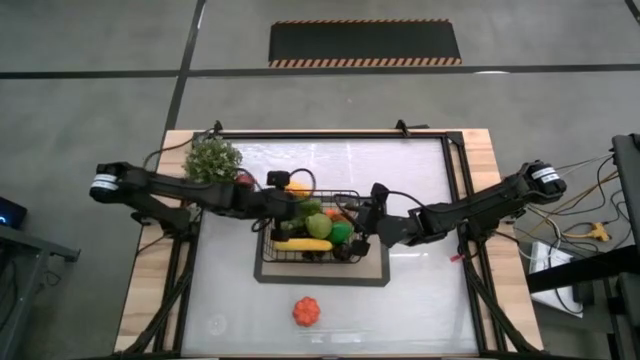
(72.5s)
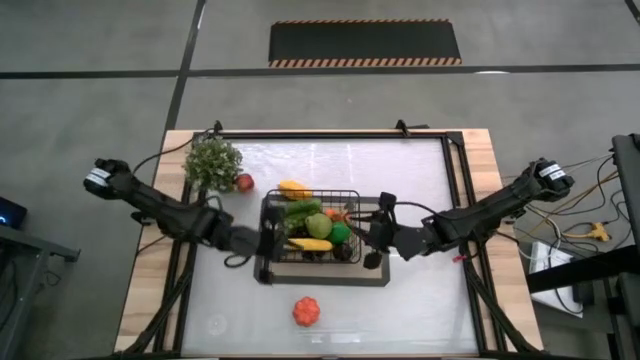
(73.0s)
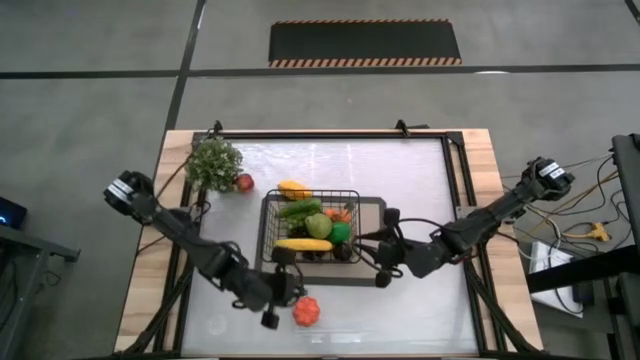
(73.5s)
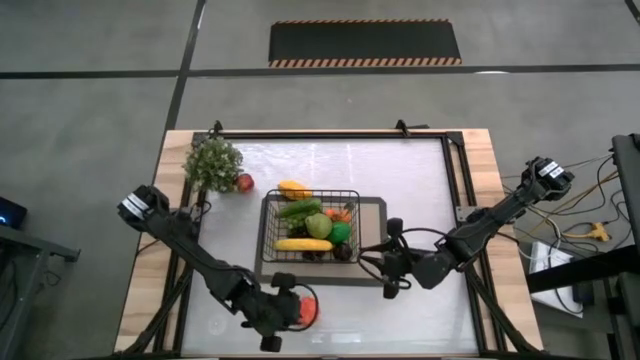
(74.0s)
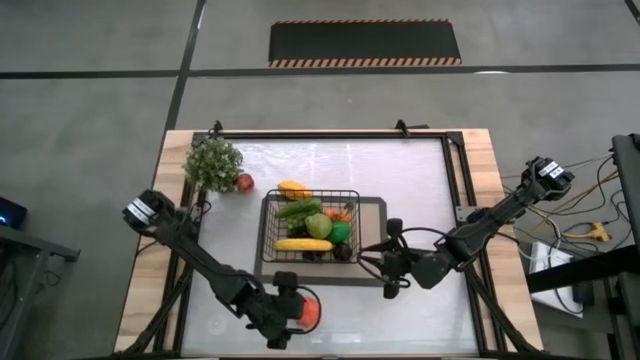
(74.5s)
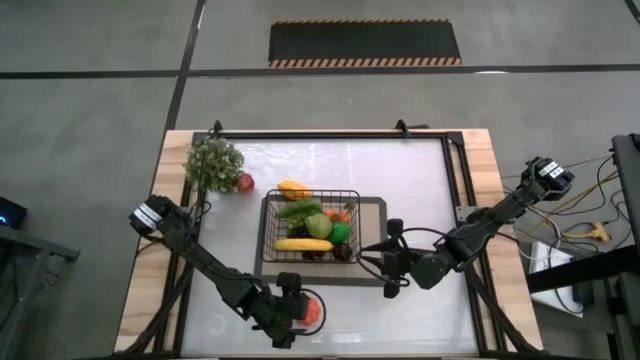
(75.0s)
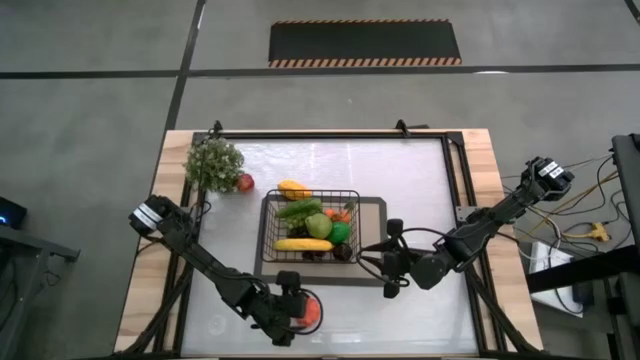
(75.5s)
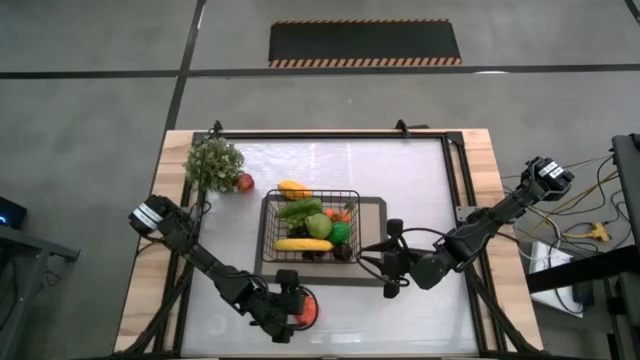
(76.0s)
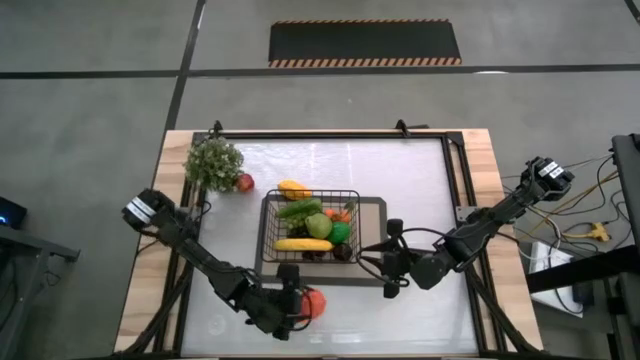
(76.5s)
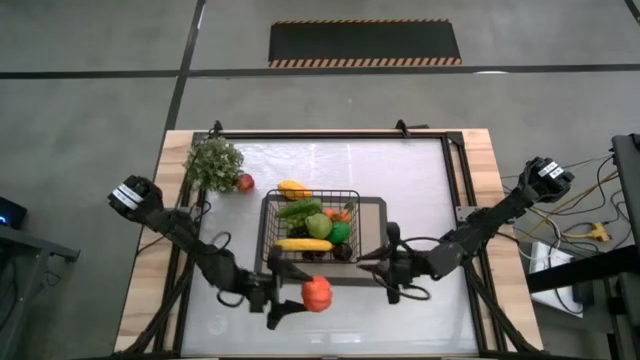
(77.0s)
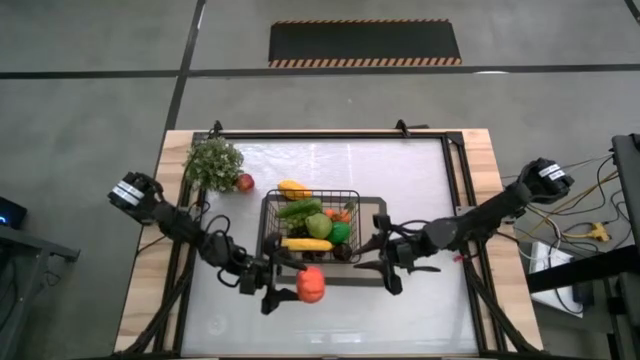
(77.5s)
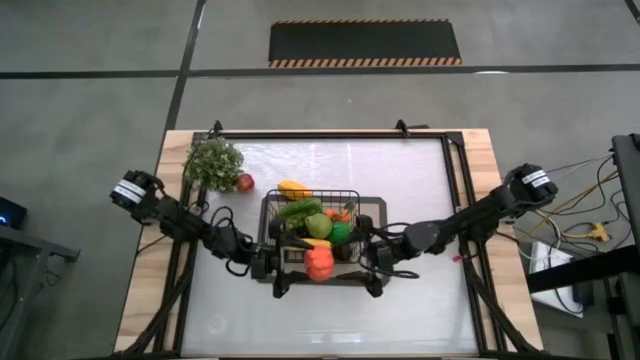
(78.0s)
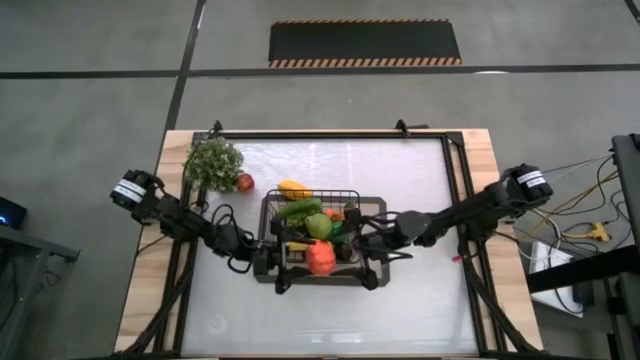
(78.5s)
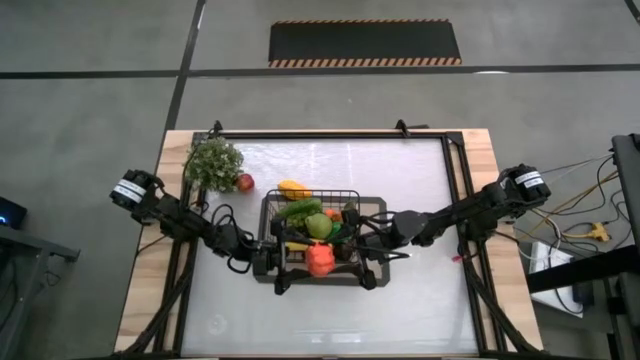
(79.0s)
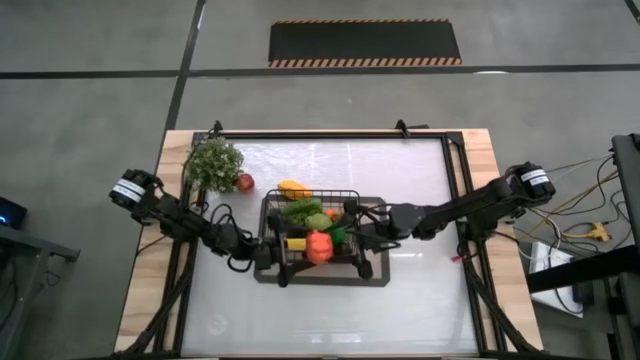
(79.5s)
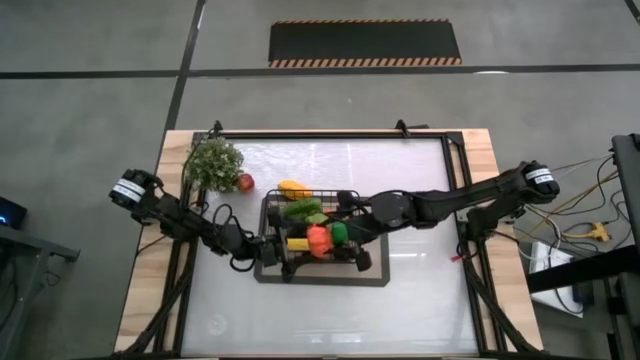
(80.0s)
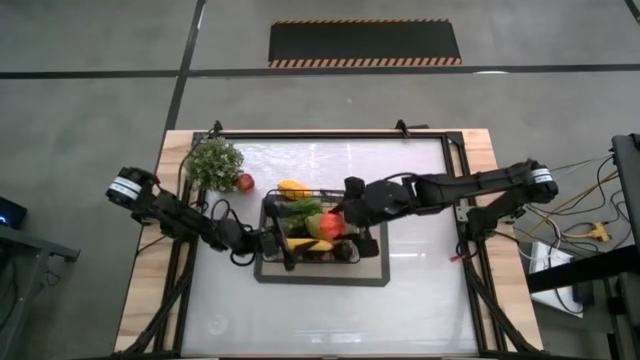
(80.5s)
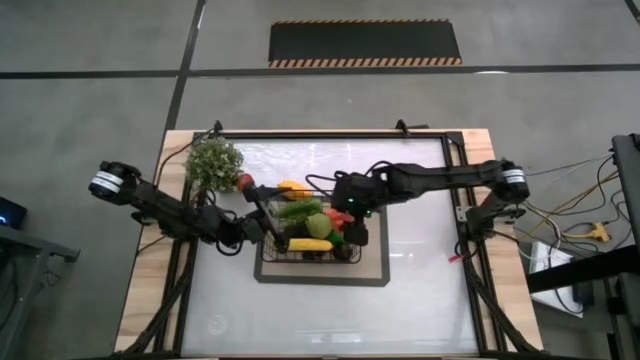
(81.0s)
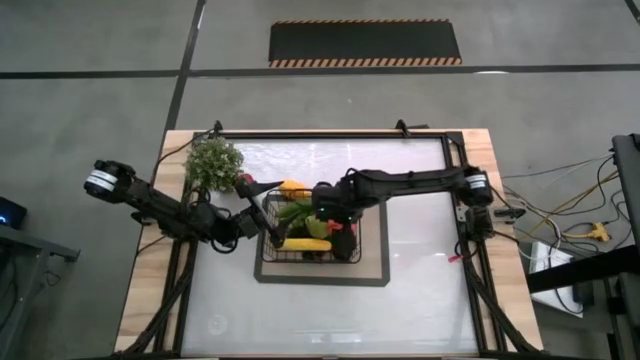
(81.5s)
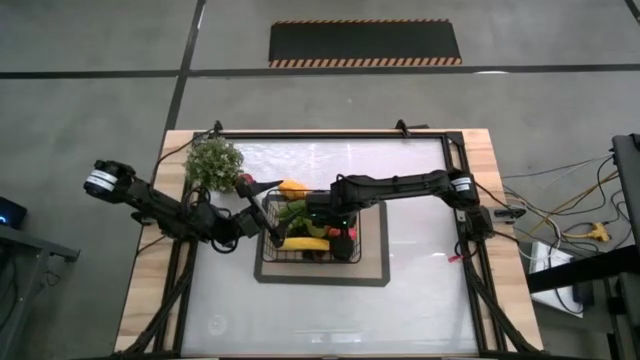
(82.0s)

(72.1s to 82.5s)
Task: Build produce basket
Put the orange tangerines into the black wire basket

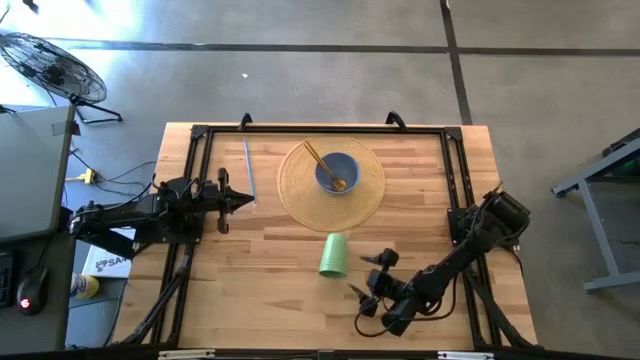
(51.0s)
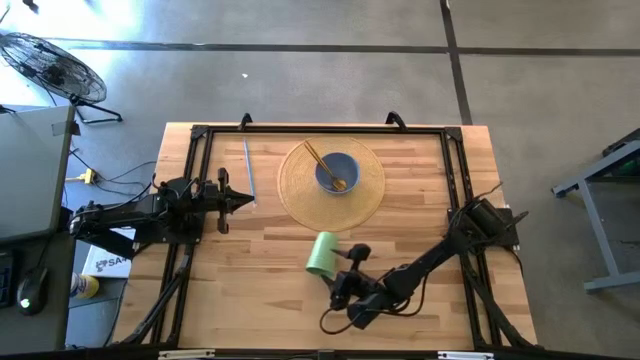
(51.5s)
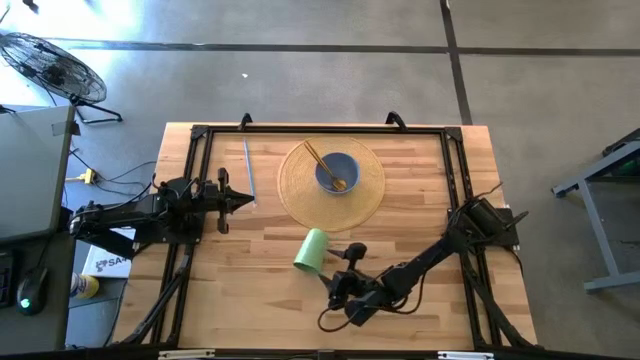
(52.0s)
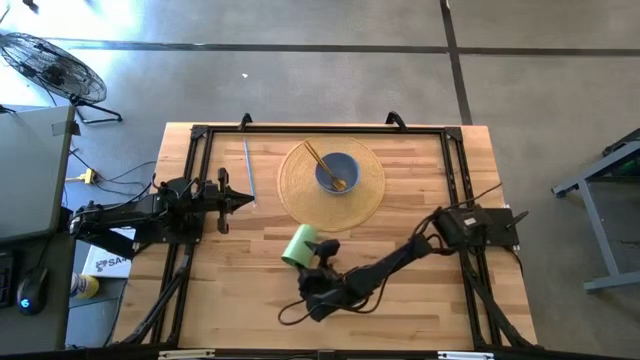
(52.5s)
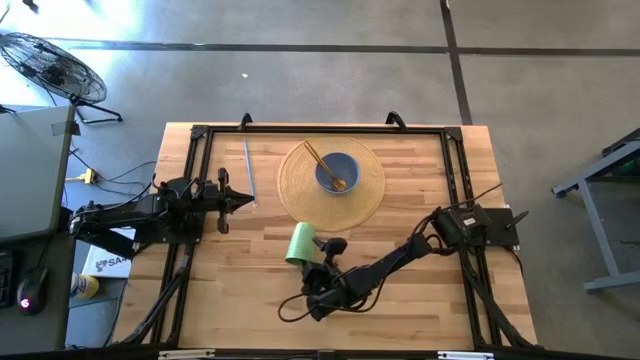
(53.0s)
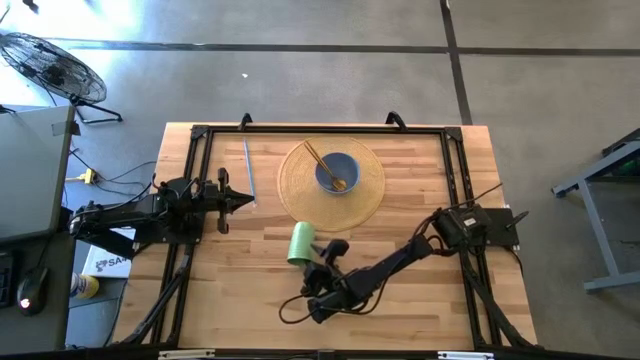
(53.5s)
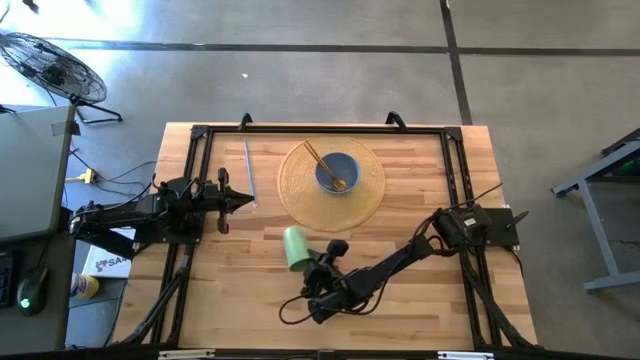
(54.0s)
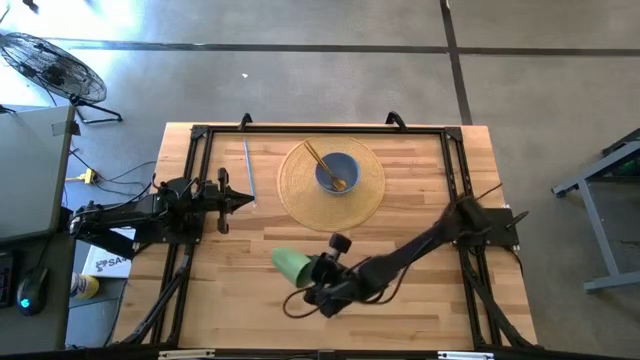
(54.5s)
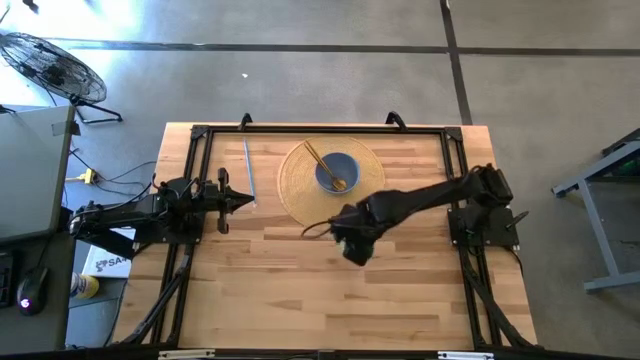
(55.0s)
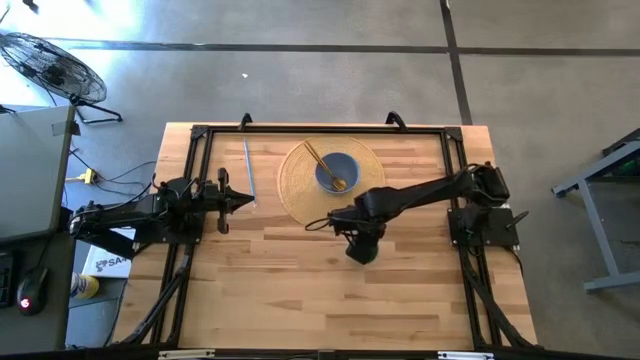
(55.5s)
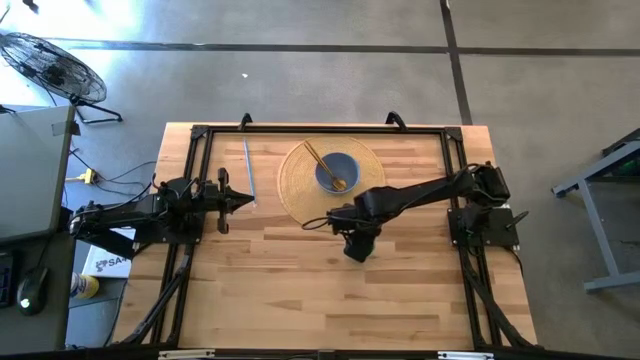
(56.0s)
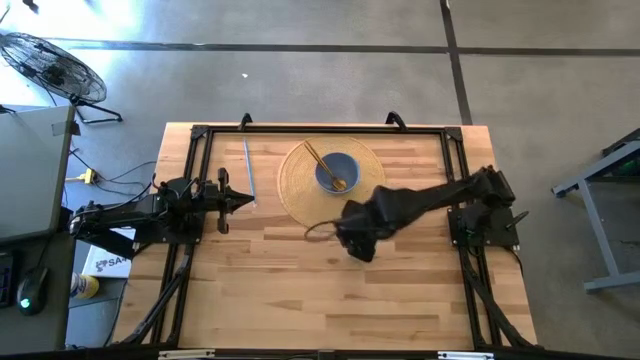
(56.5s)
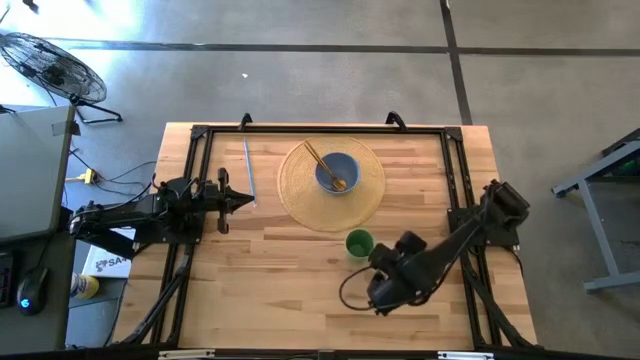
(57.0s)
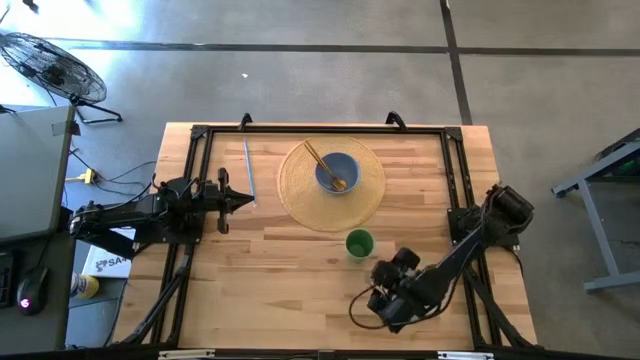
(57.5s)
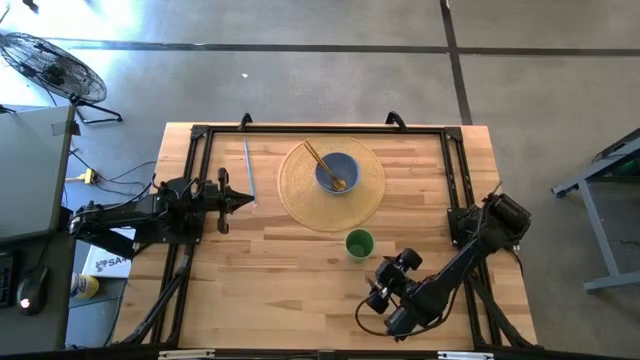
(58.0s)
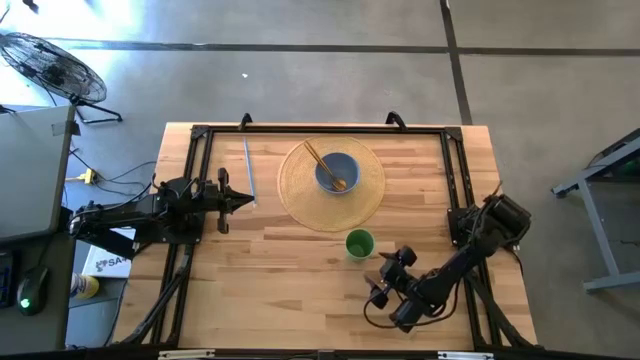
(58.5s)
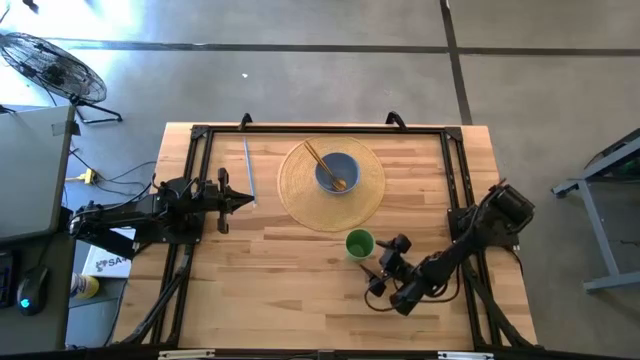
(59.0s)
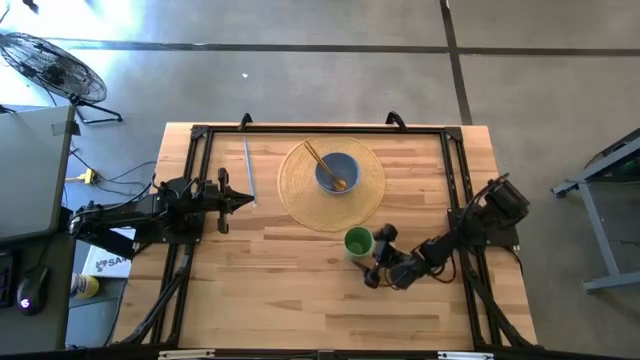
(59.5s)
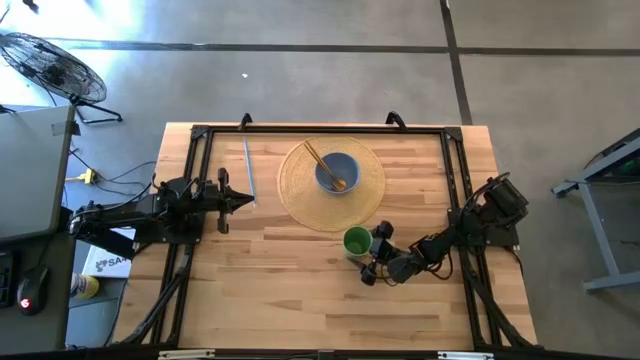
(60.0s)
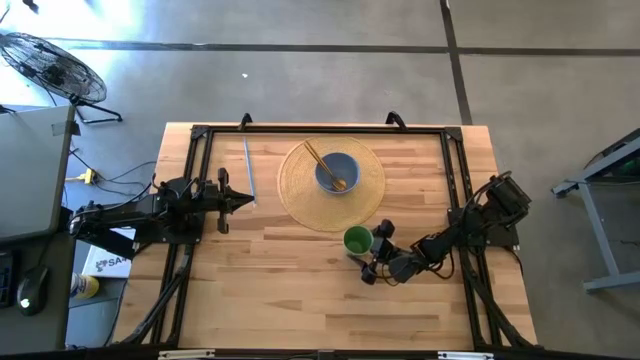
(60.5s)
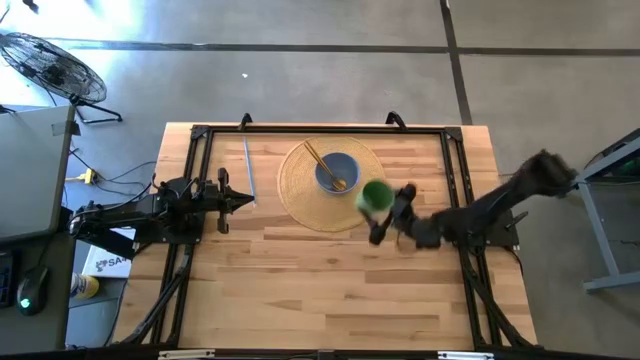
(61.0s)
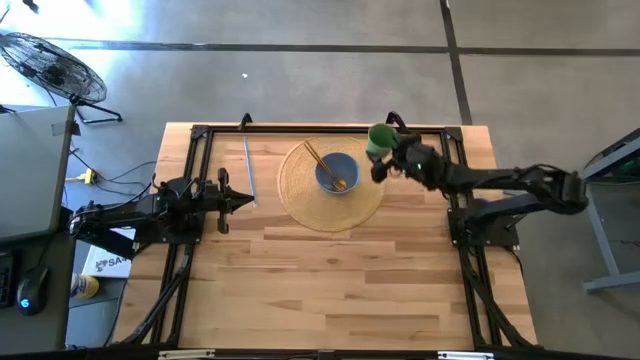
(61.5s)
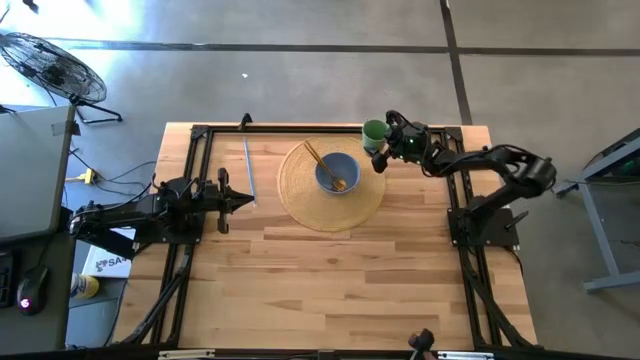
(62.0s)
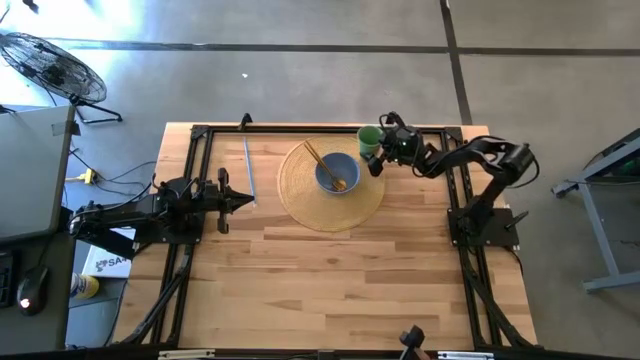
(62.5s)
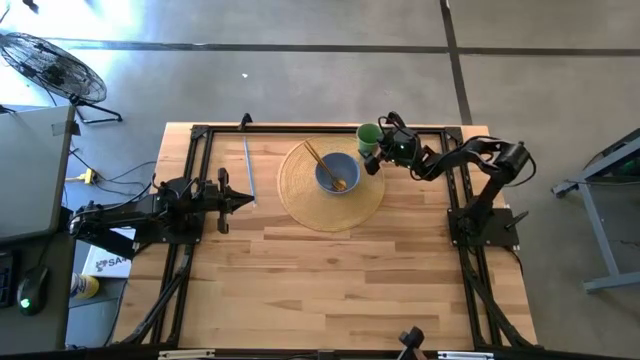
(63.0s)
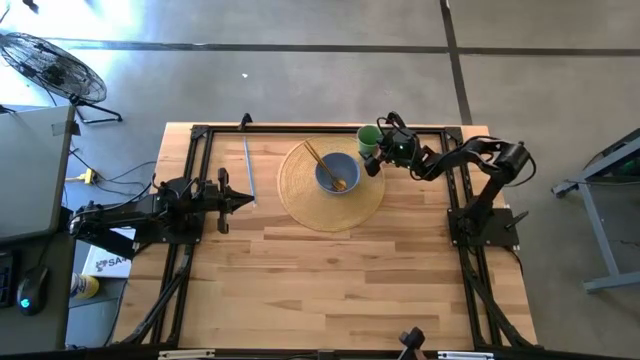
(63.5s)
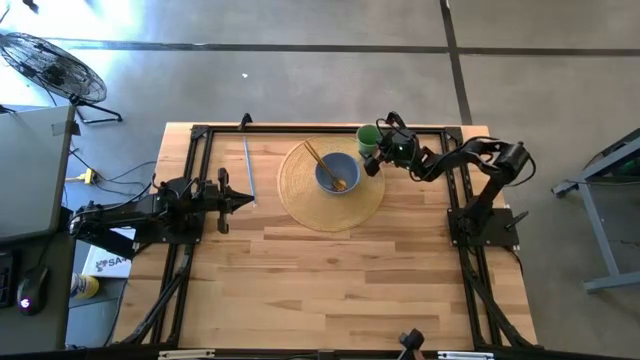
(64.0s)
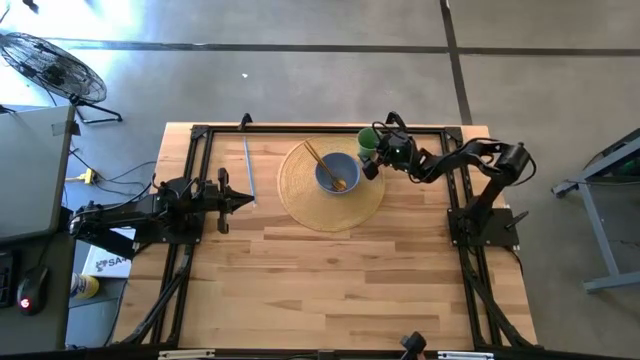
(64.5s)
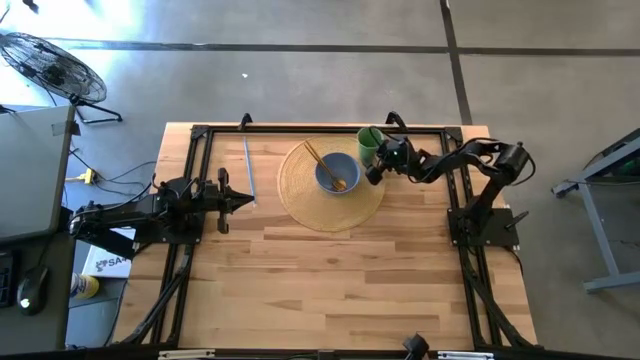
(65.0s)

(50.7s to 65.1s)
Task: Pick & Place Utensil
Put the green cup to the top right of the blue bowl on the brown mat
